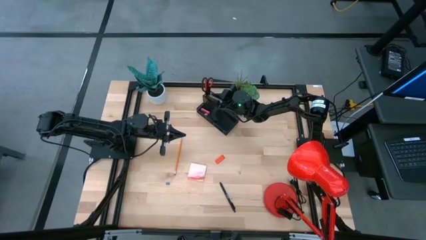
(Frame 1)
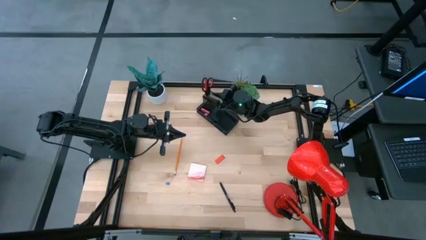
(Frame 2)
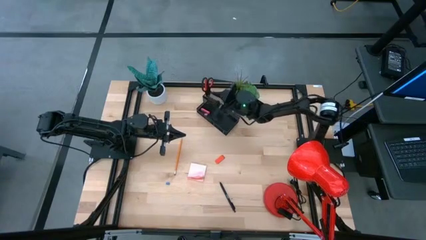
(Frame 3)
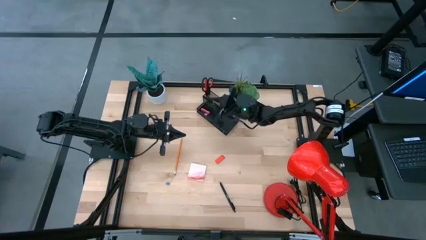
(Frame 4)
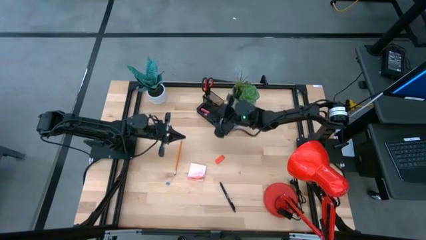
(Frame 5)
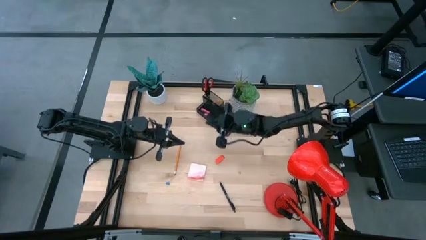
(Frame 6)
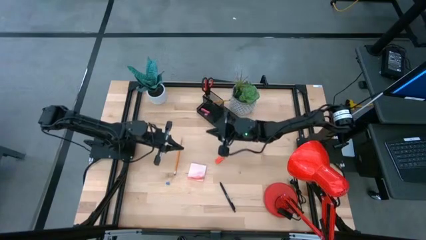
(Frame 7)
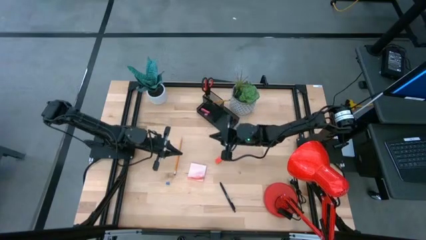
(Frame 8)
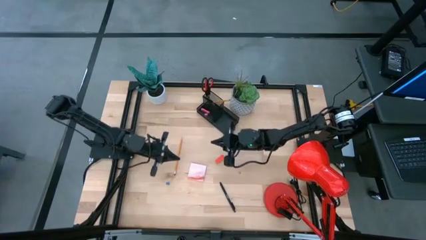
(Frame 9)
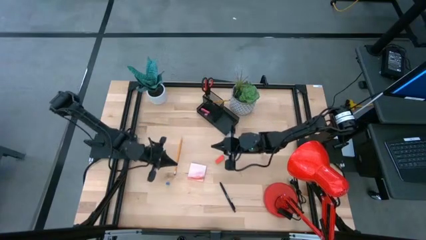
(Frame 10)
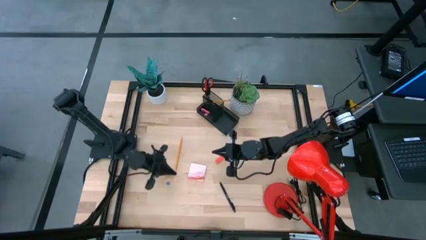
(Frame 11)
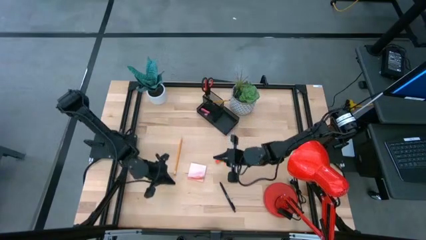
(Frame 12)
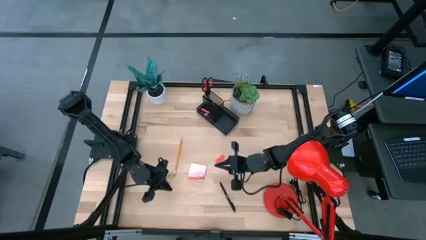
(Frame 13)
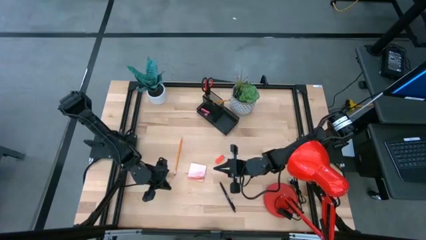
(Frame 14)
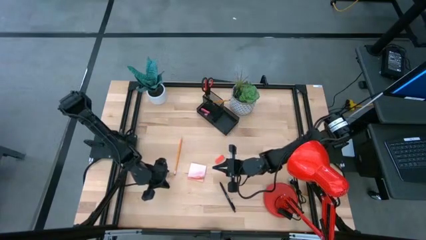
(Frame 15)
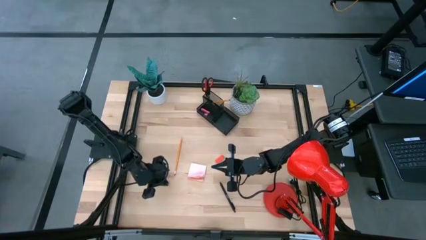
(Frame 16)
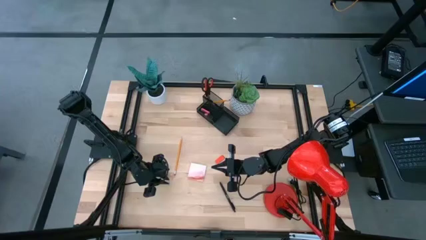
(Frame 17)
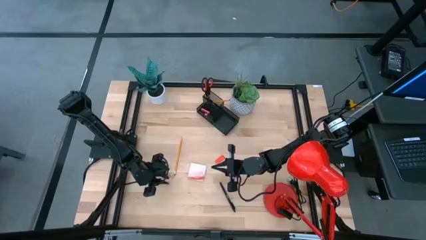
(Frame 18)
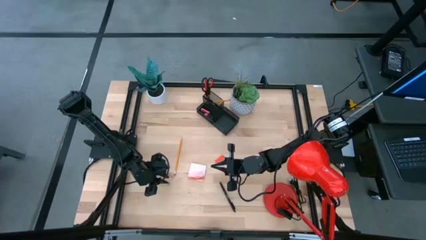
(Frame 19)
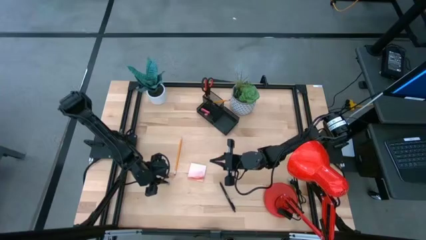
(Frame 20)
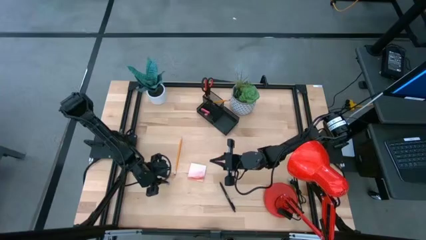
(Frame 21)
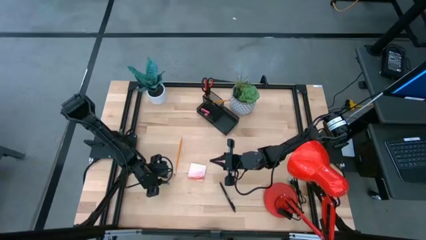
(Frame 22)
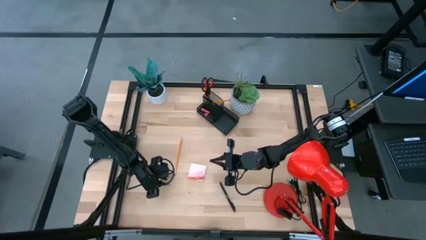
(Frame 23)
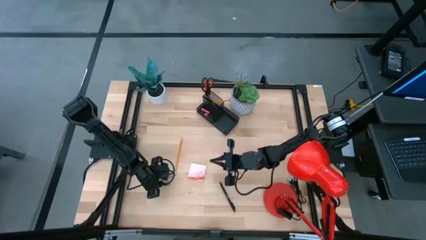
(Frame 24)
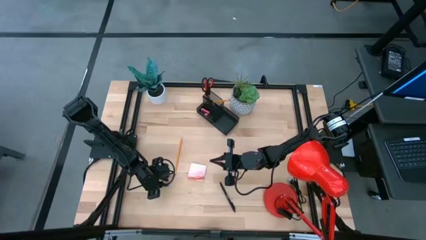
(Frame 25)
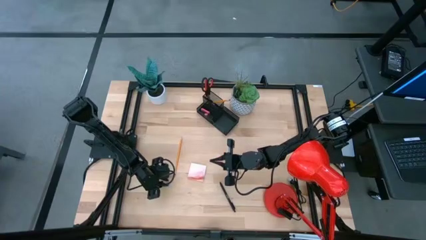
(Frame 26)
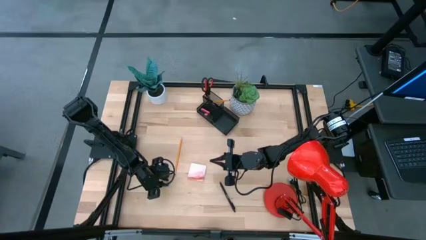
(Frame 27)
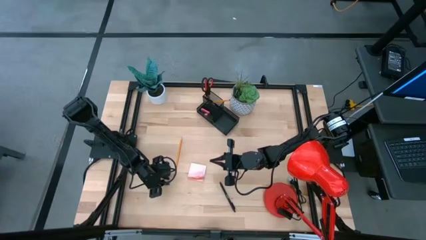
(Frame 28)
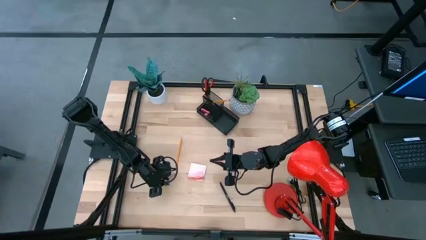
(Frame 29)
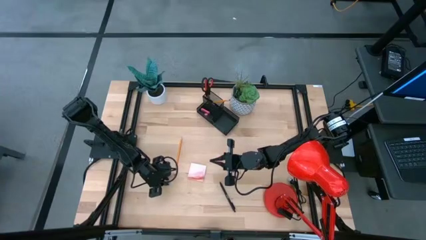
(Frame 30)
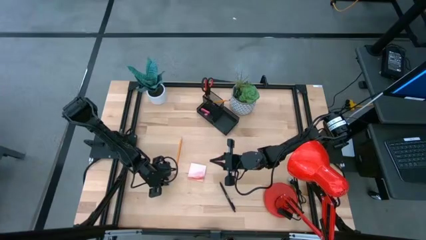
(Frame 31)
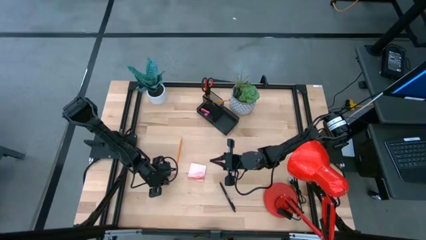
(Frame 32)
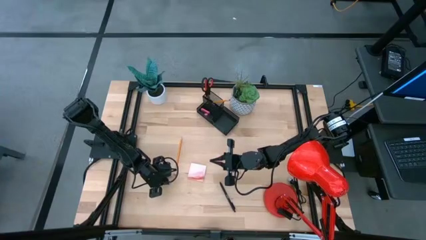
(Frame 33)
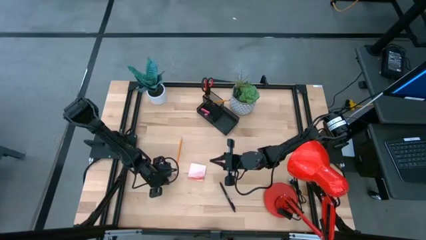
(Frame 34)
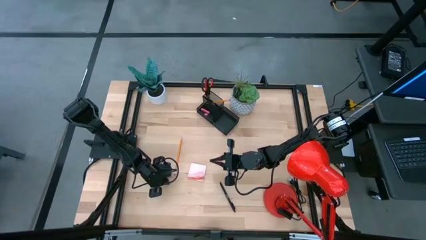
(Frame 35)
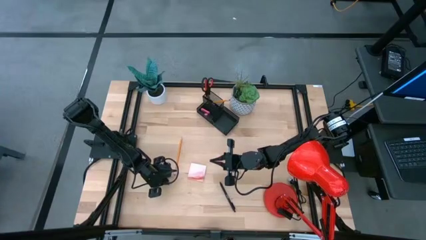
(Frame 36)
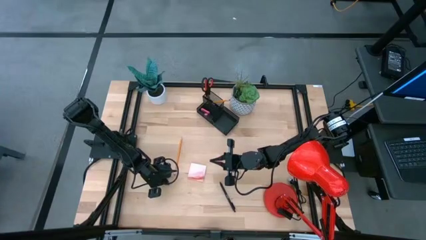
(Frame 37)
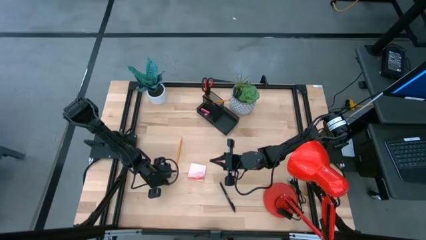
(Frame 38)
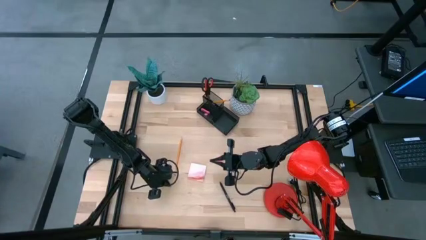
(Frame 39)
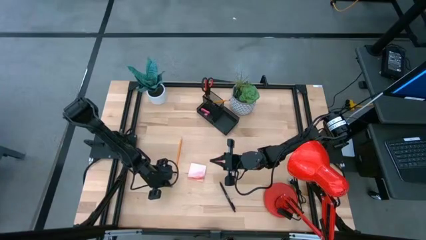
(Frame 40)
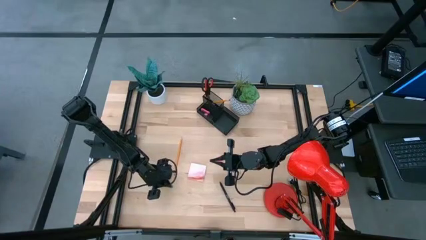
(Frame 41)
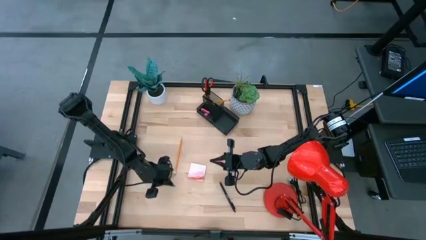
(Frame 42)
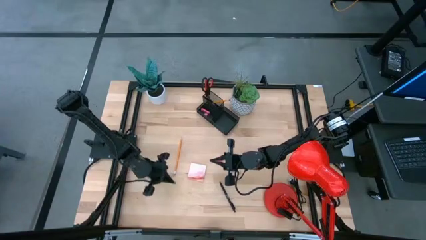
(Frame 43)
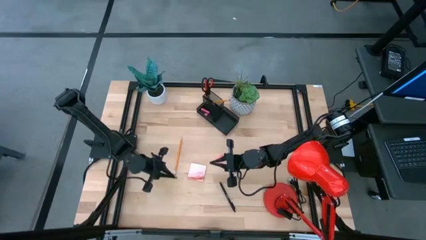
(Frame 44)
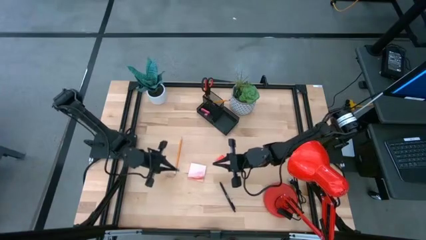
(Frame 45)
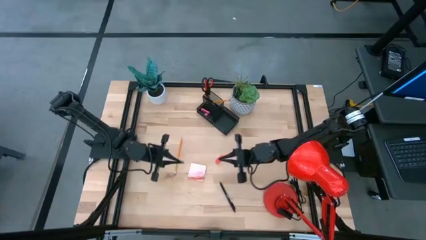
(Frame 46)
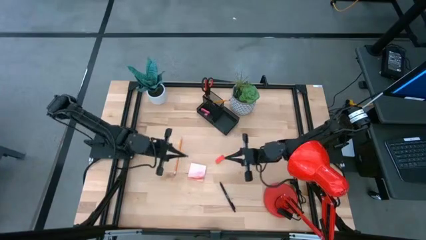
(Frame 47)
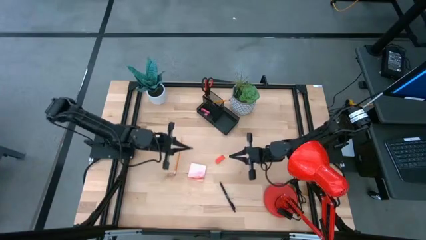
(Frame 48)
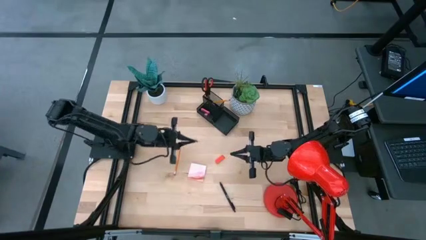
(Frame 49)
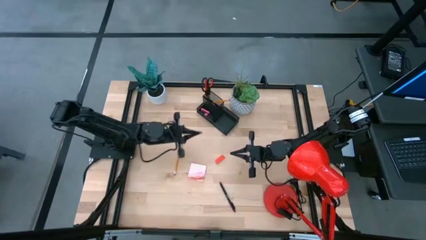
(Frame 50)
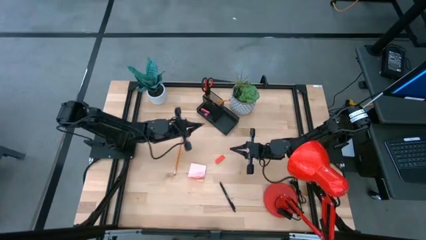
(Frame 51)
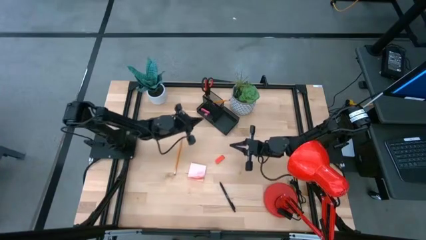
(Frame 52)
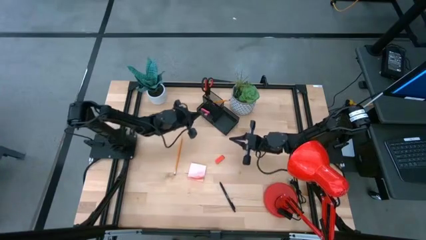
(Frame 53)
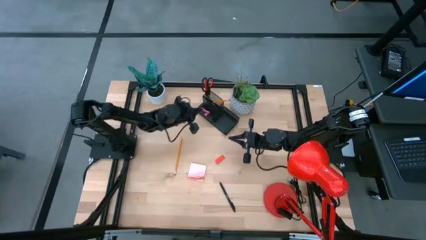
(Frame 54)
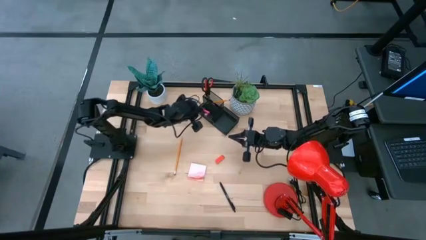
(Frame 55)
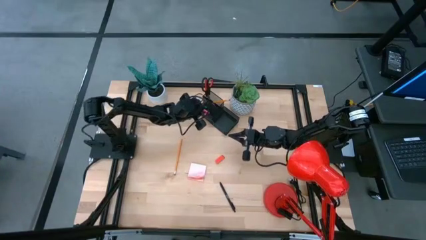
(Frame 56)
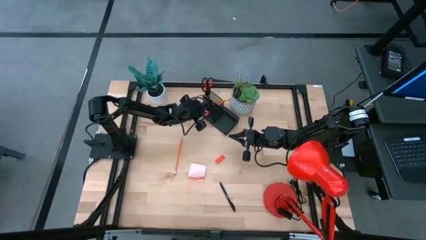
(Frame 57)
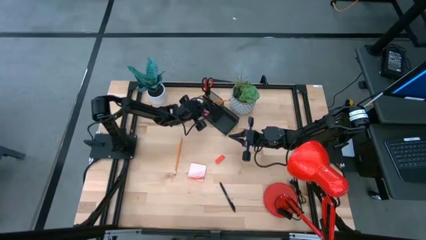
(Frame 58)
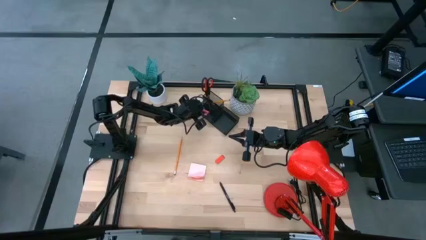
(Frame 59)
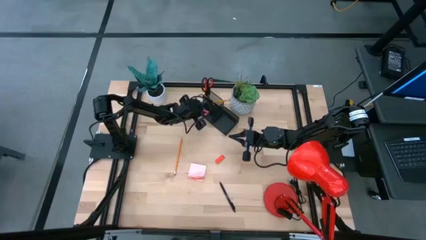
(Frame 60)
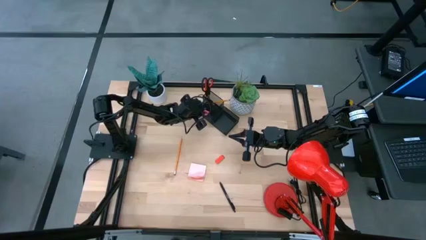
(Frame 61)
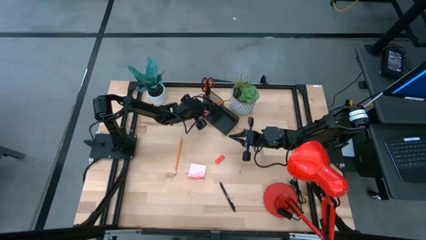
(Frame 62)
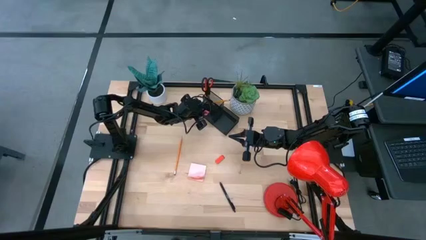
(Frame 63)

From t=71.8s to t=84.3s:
Task: Pick and place office supplies into organizer
Put the blue binder clip into the black desk organizer
